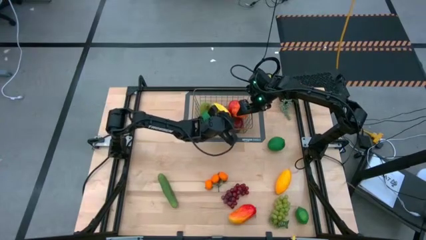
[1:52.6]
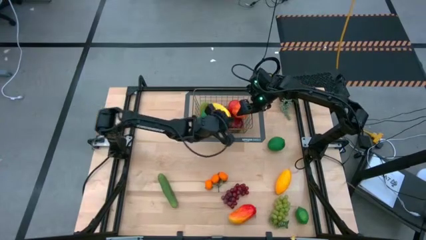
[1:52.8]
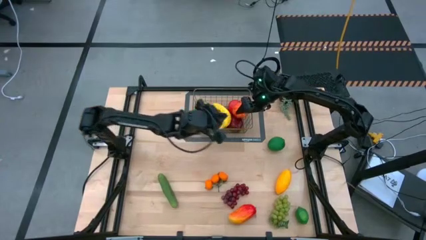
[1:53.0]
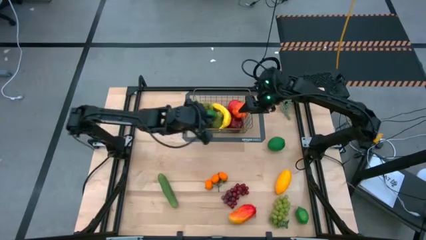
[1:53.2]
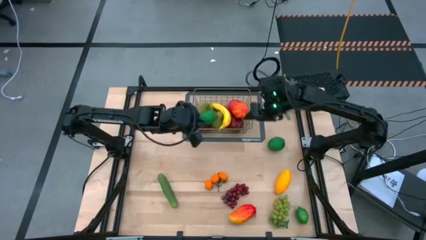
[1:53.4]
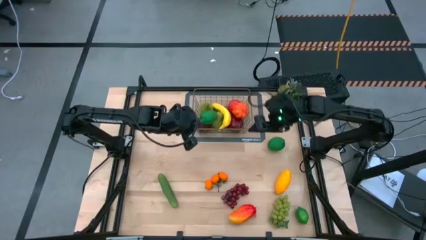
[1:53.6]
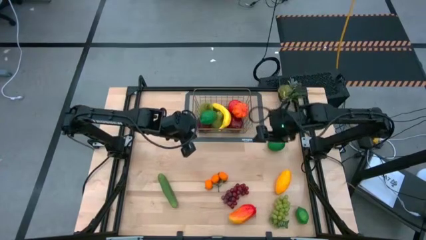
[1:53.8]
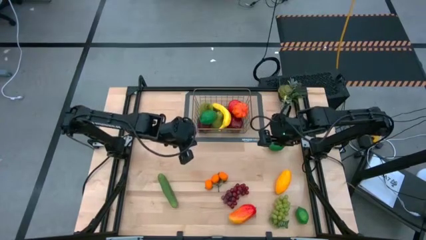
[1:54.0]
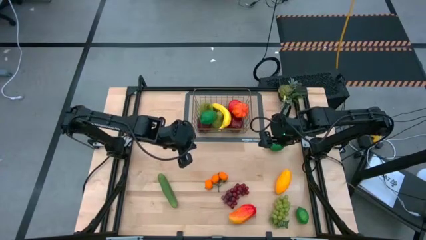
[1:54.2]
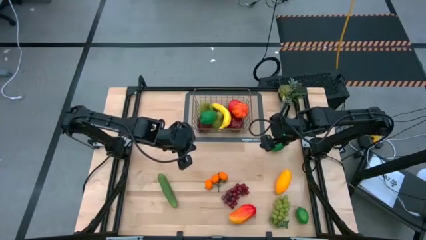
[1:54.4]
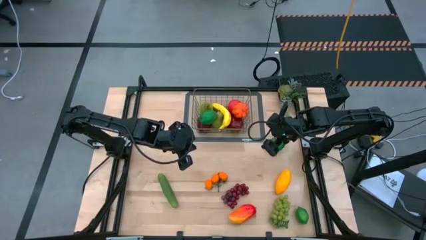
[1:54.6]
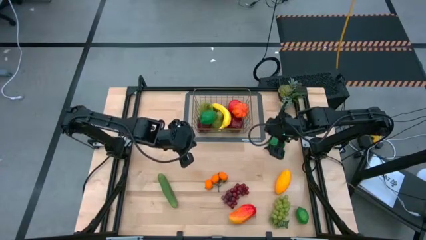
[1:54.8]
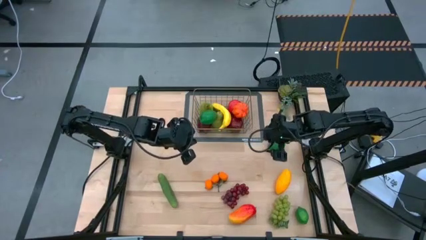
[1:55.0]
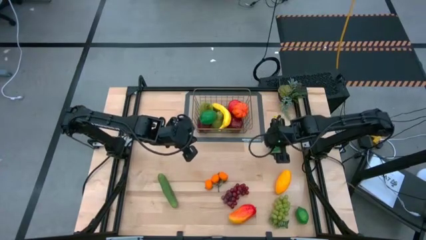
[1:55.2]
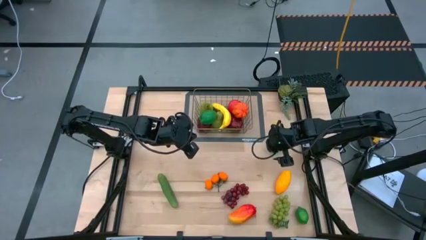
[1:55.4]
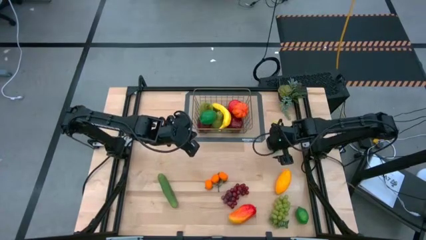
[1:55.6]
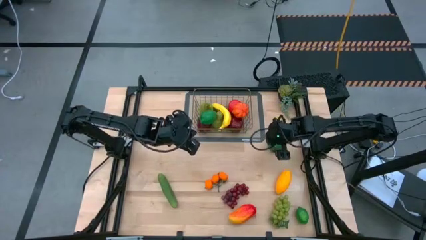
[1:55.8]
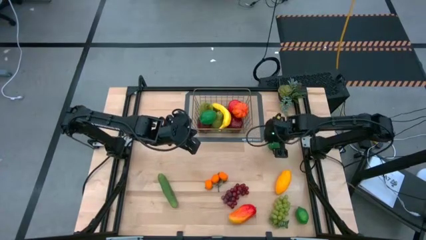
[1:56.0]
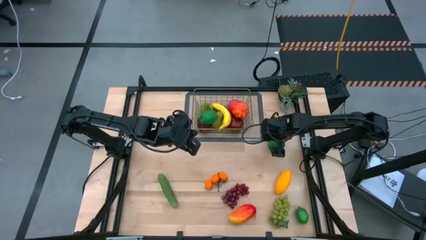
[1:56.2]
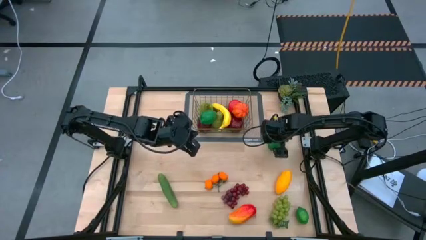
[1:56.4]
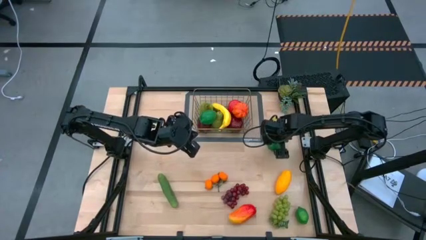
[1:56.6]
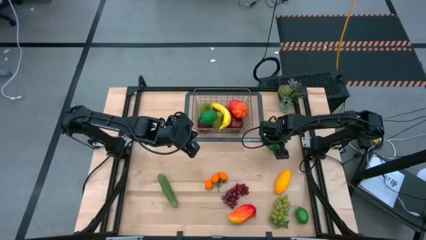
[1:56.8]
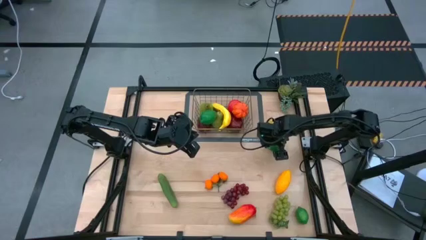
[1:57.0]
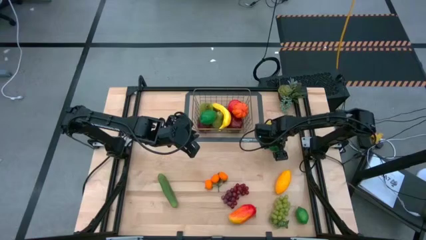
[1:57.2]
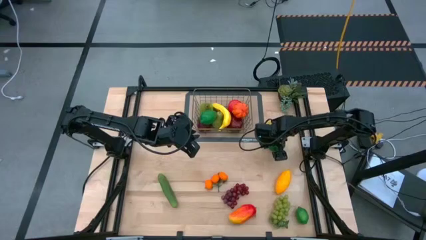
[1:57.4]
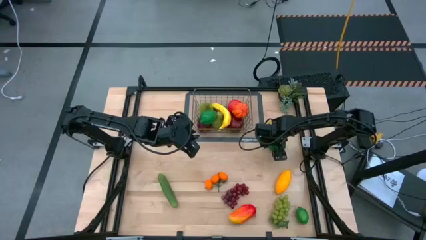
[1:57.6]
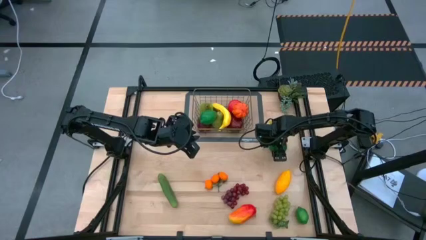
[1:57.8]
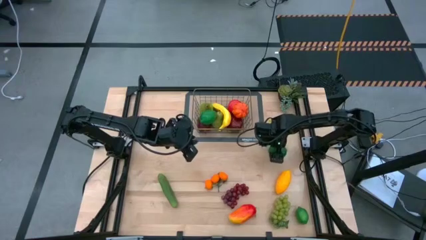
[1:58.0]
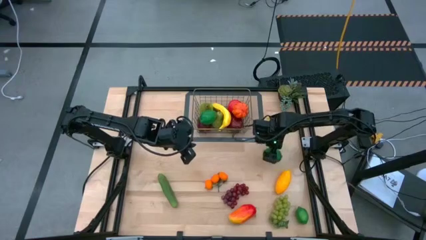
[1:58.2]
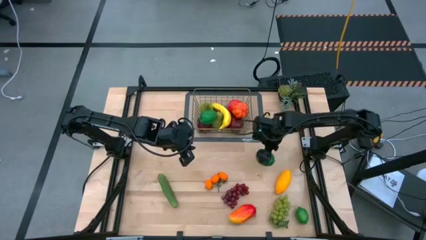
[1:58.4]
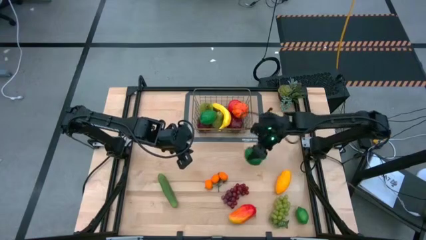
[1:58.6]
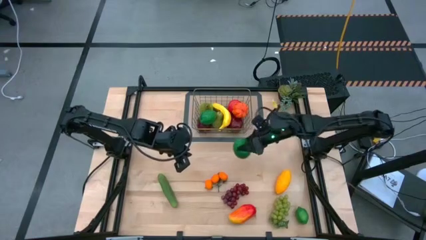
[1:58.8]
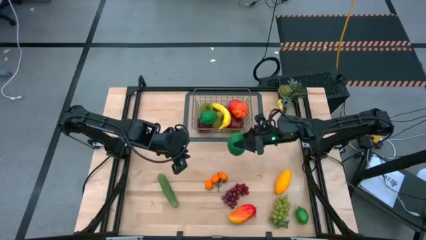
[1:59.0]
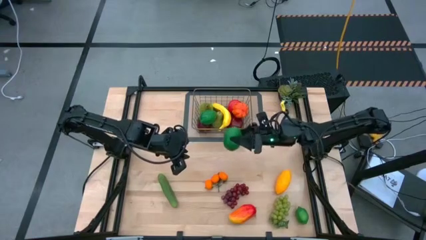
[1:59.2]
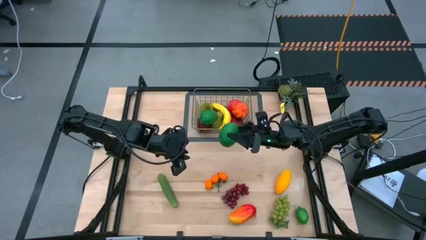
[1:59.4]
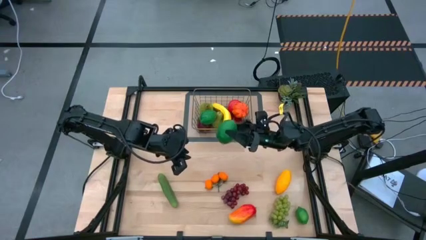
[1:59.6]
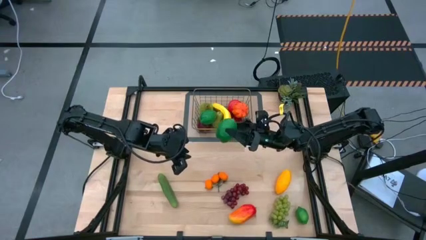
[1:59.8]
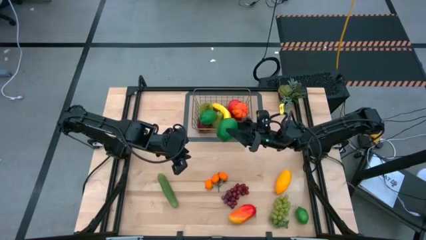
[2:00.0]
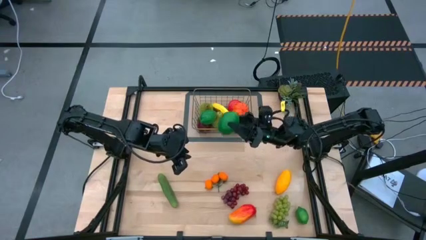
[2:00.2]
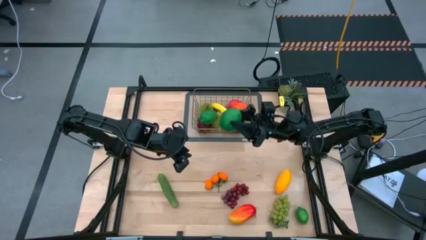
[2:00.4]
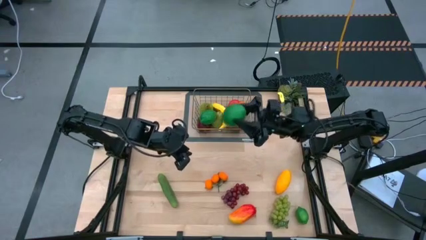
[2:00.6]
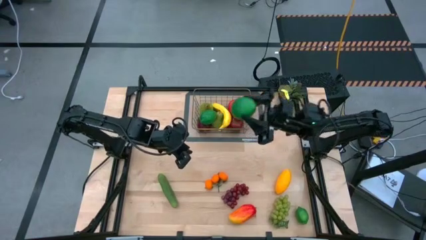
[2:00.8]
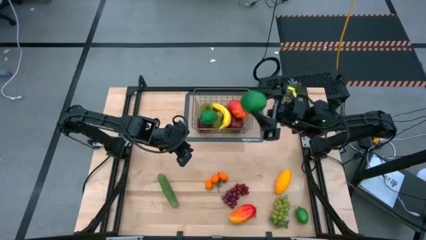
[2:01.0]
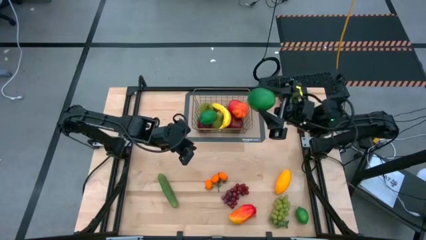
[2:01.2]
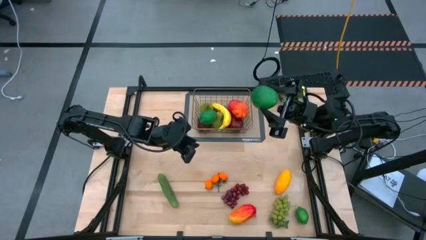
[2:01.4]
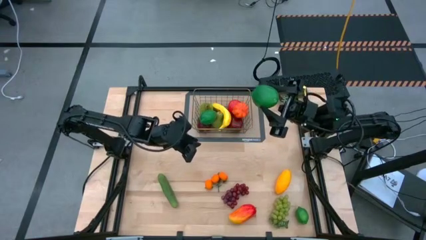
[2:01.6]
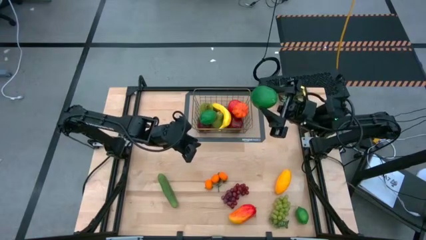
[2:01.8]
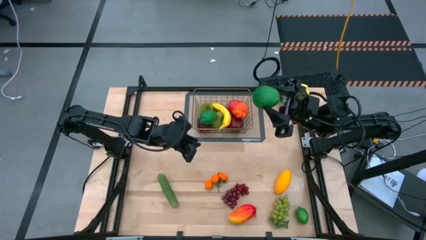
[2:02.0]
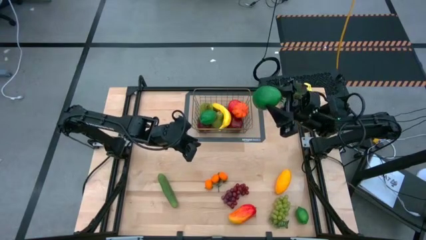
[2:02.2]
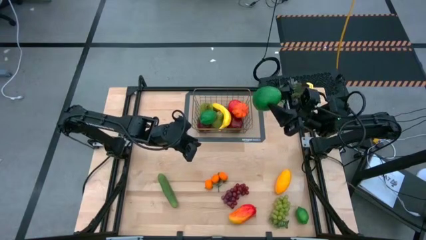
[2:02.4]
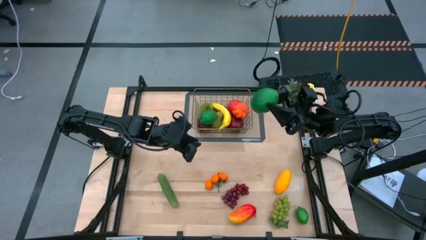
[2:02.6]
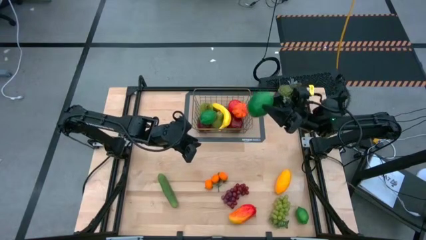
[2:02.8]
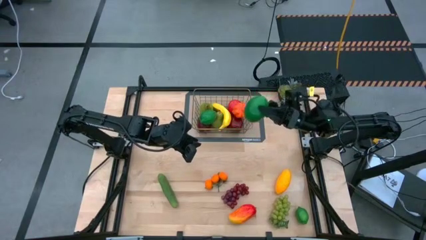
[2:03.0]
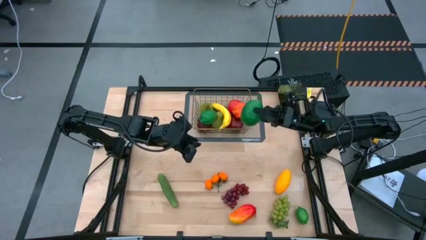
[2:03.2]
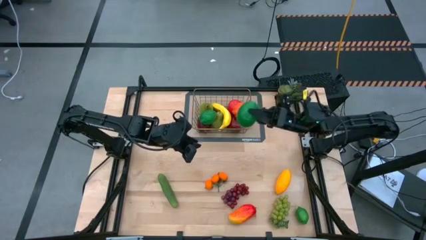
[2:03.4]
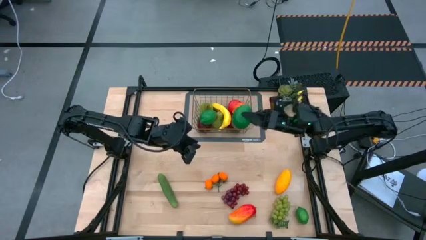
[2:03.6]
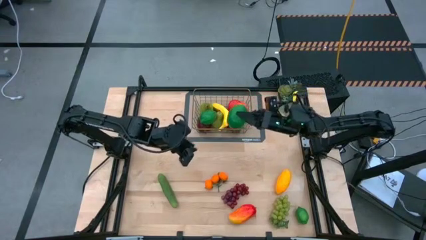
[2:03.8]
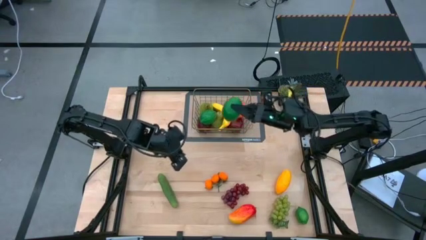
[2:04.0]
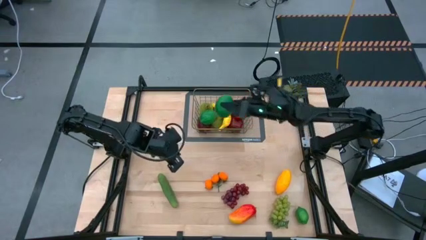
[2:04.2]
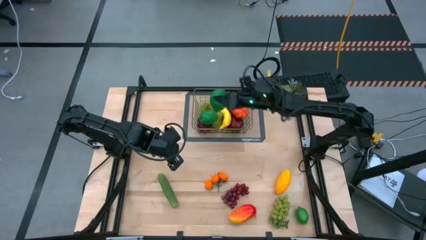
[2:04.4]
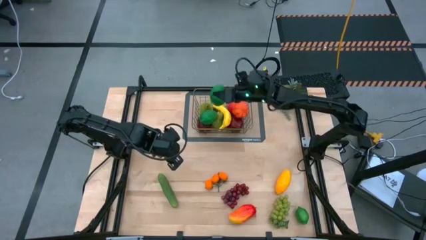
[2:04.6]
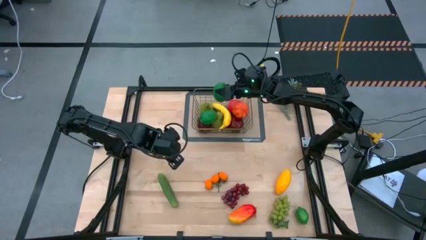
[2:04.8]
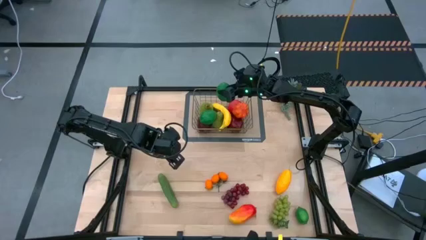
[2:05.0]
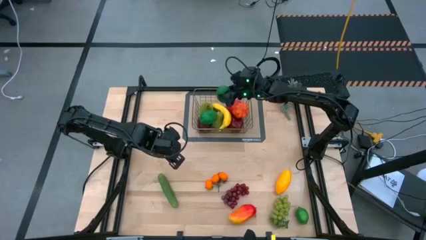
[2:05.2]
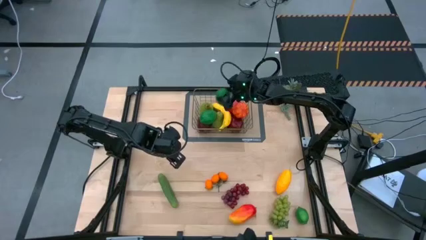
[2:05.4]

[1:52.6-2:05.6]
Task: Build produce basket
Put the top green lime into the brown wire basket

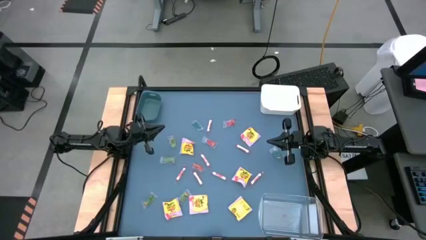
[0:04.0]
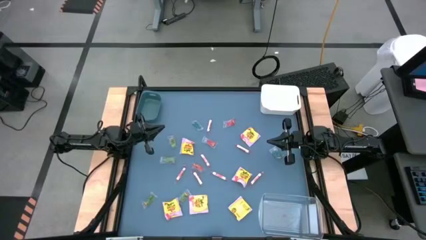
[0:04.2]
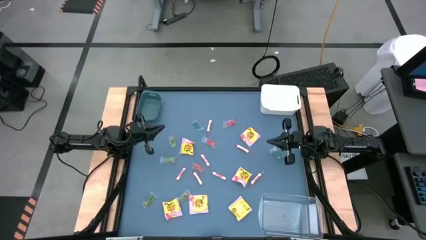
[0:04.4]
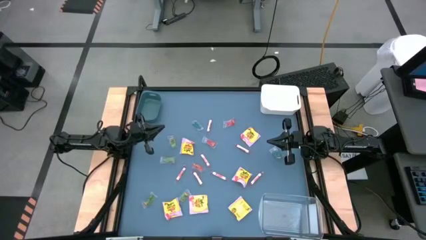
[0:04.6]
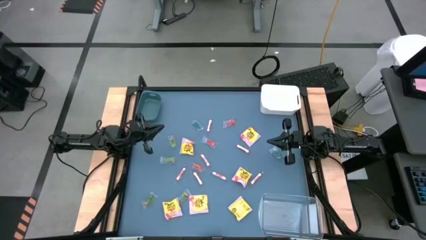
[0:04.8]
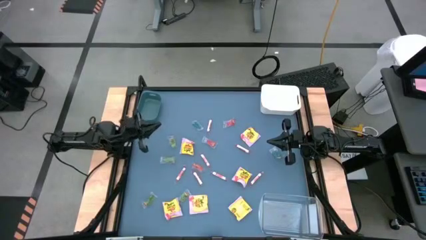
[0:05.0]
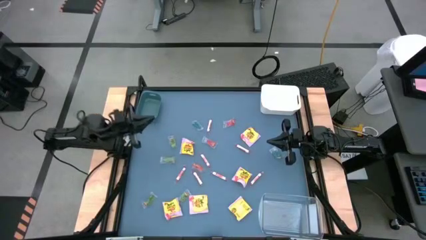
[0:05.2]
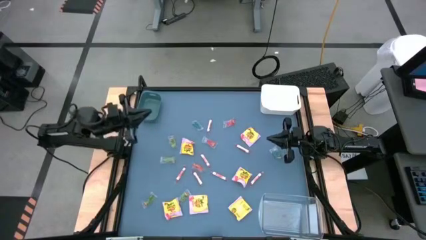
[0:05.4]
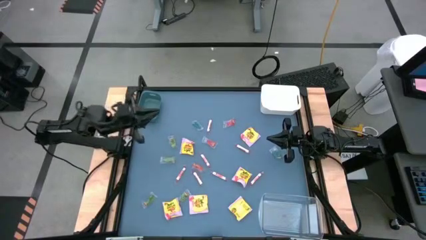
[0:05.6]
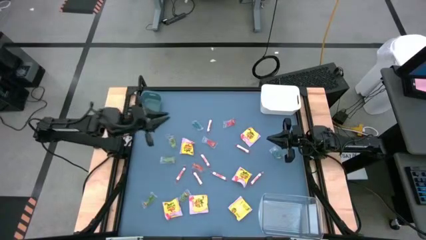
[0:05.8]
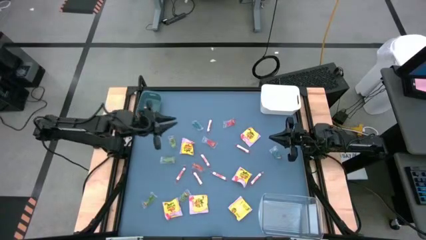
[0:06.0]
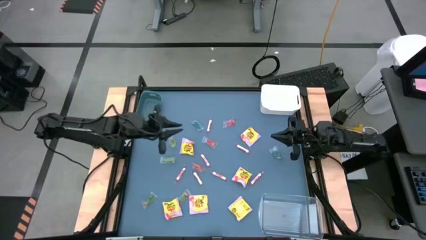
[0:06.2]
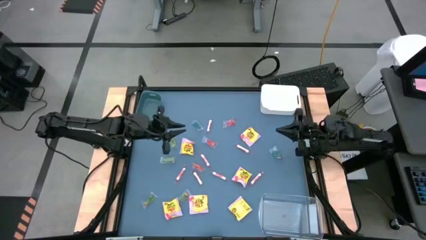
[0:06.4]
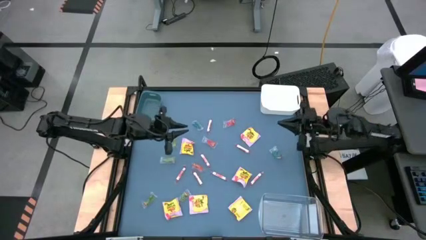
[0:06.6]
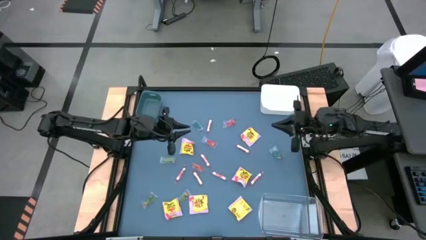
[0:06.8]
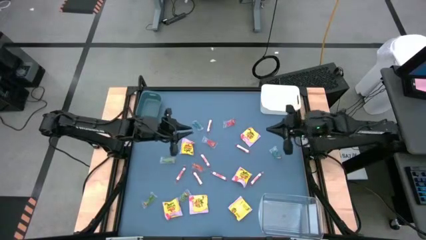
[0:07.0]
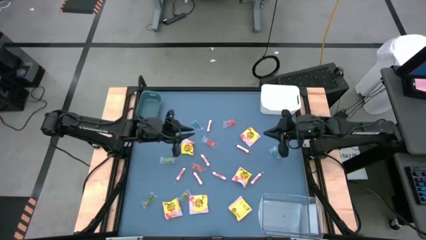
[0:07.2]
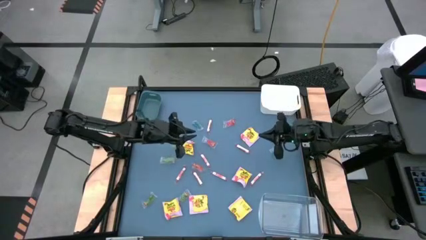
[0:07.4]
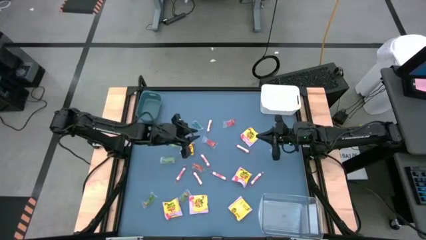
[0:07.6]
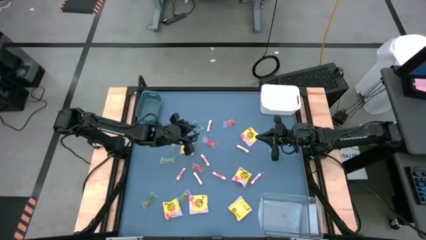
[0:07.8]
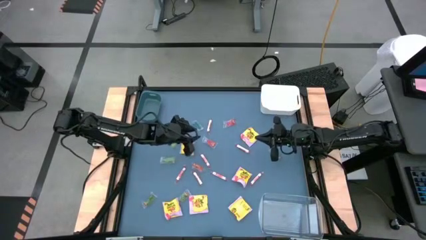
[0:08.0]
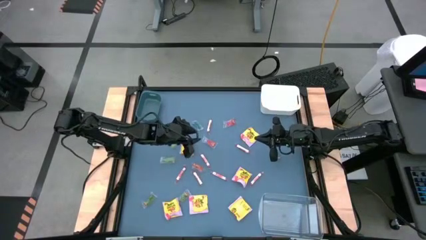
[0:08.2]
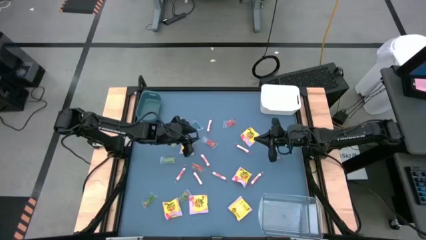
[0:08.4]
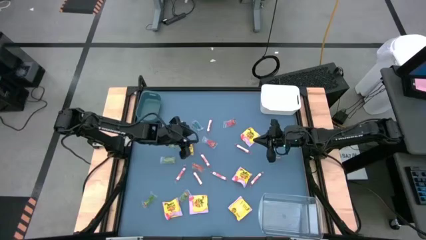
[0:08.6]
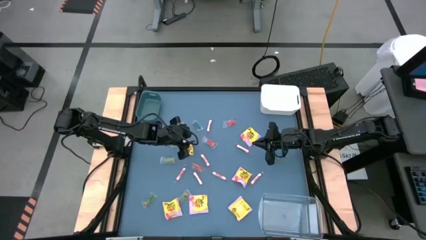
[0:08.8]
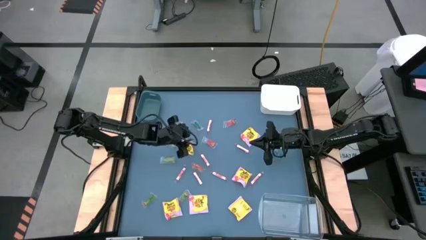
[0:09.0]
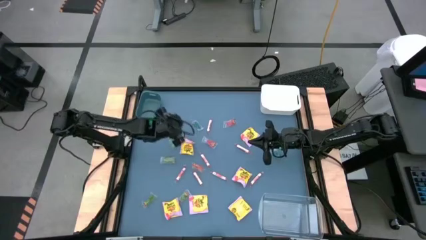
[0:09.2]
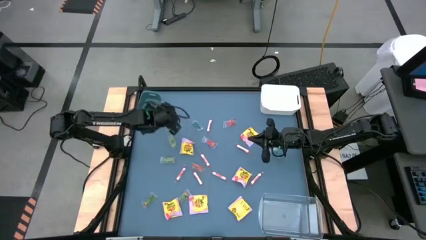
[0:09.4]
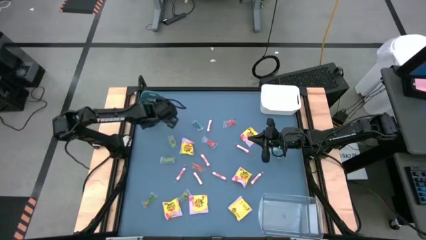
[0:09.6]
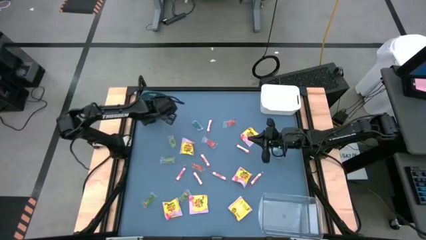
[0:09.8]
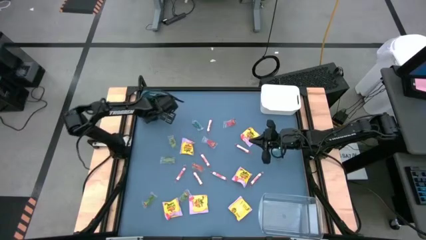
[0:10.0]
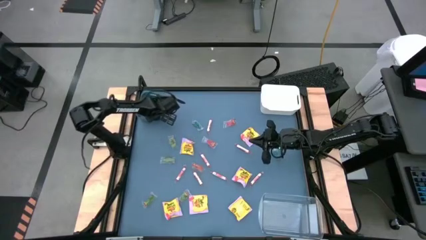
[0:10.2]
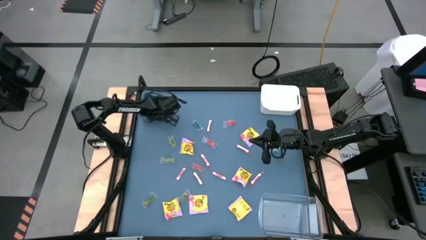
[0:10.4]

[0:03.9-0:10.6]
Task: Sort candy
Adjust the blue bin
